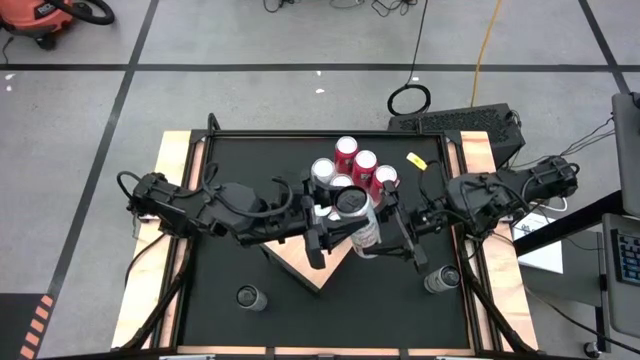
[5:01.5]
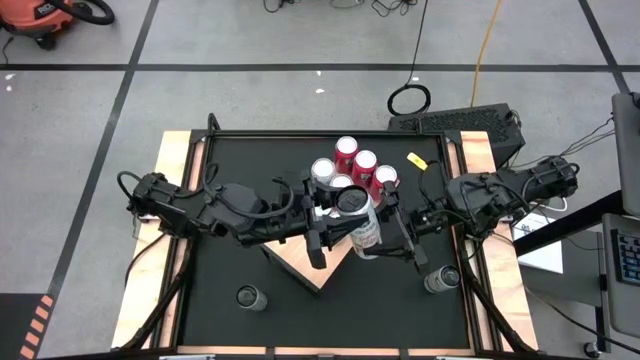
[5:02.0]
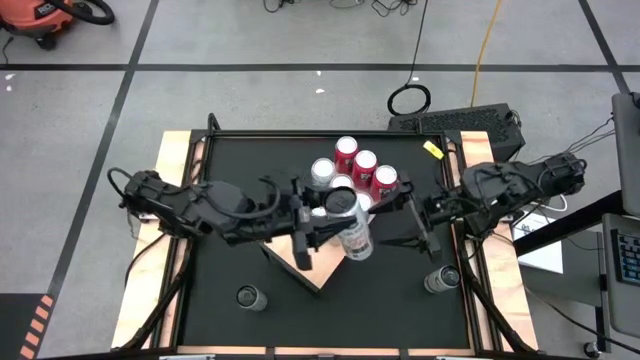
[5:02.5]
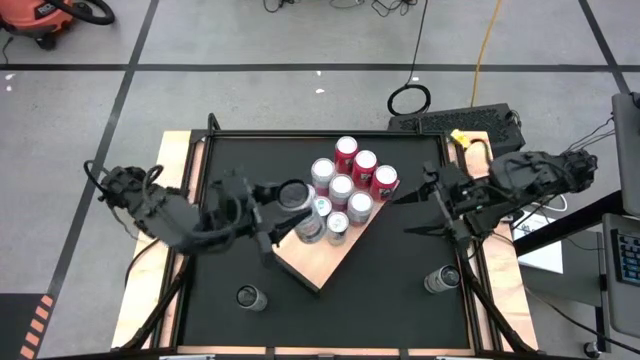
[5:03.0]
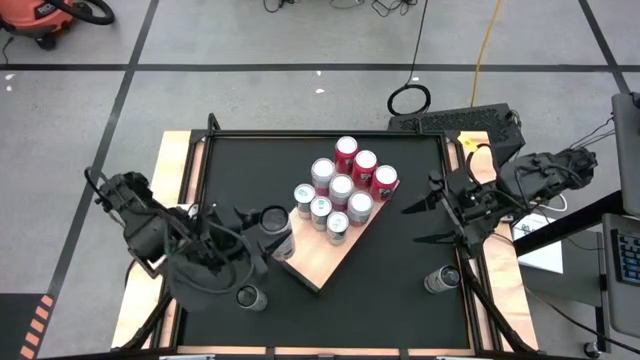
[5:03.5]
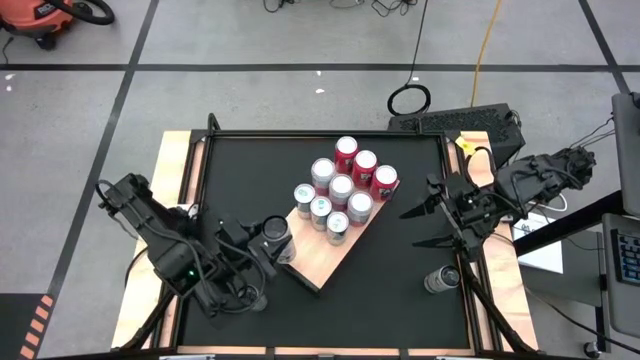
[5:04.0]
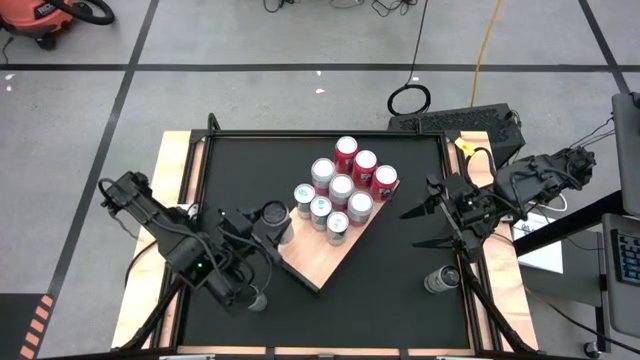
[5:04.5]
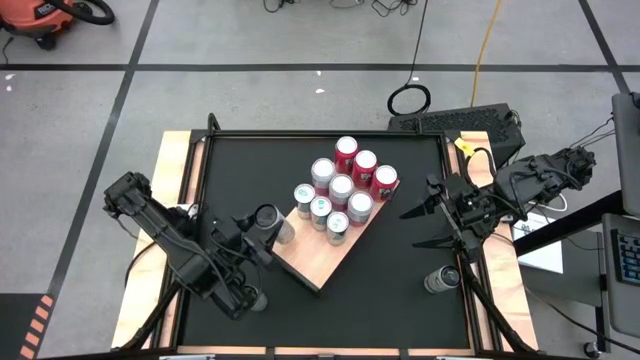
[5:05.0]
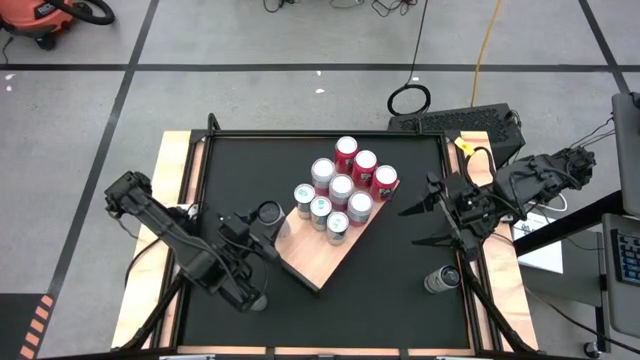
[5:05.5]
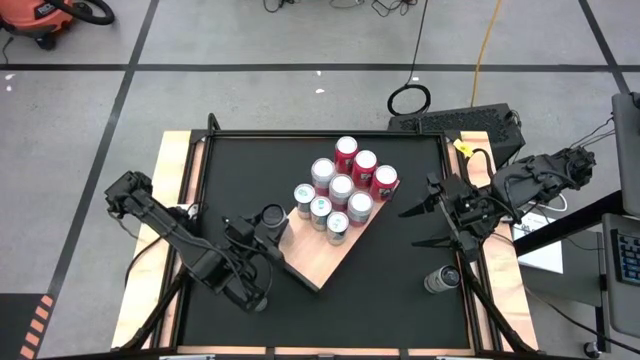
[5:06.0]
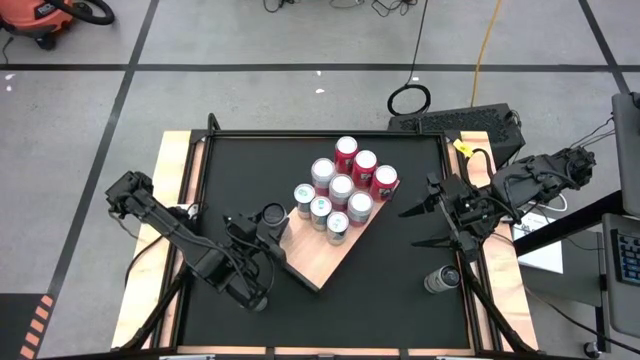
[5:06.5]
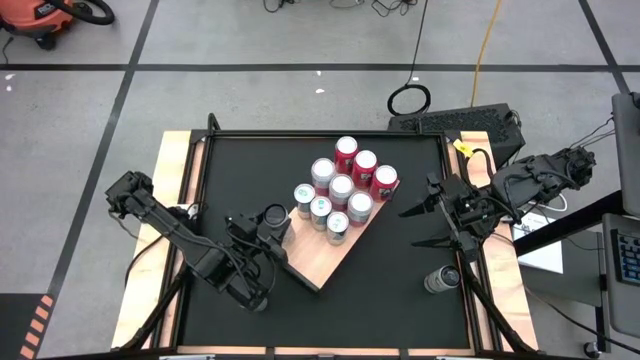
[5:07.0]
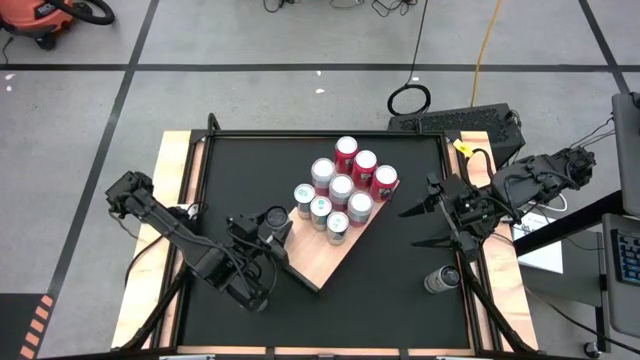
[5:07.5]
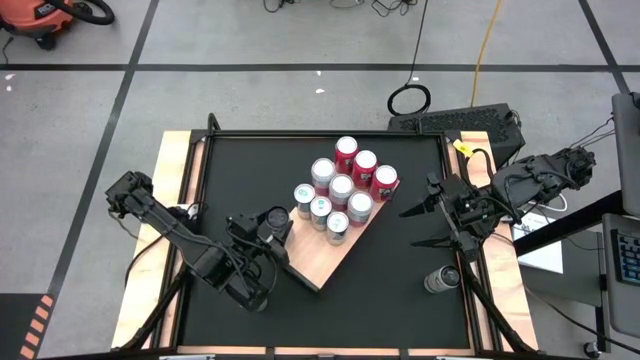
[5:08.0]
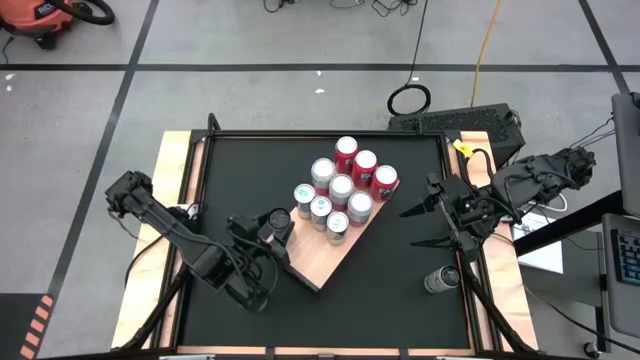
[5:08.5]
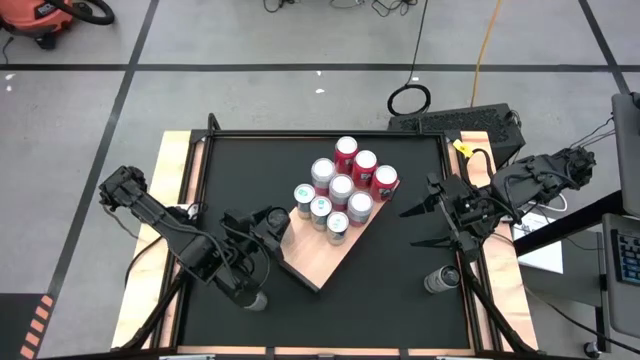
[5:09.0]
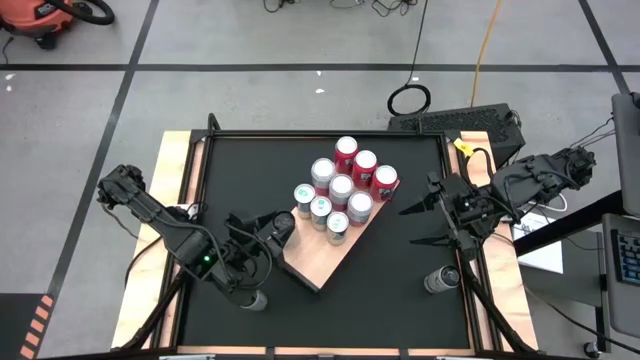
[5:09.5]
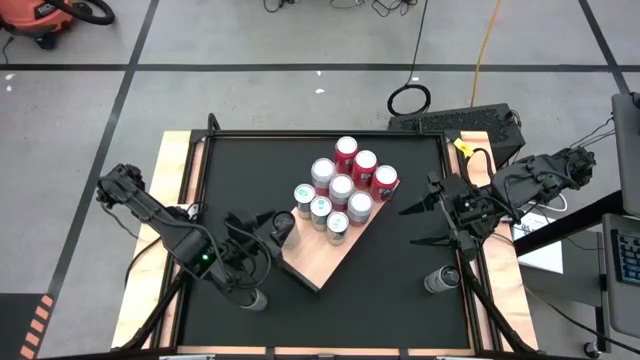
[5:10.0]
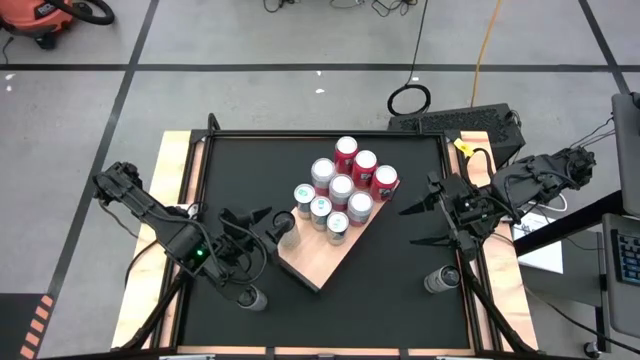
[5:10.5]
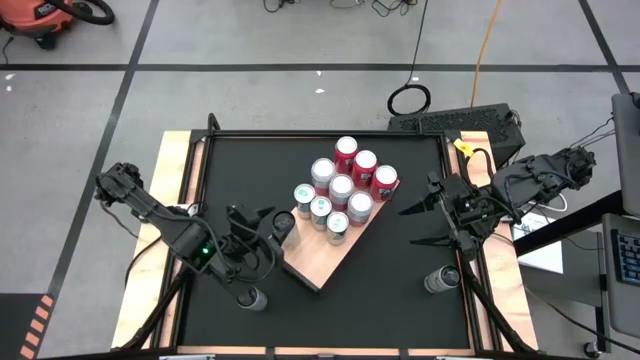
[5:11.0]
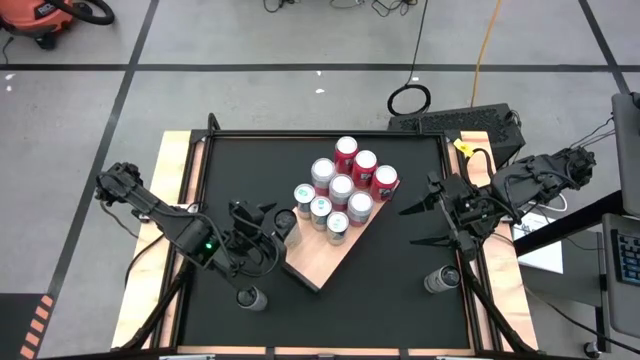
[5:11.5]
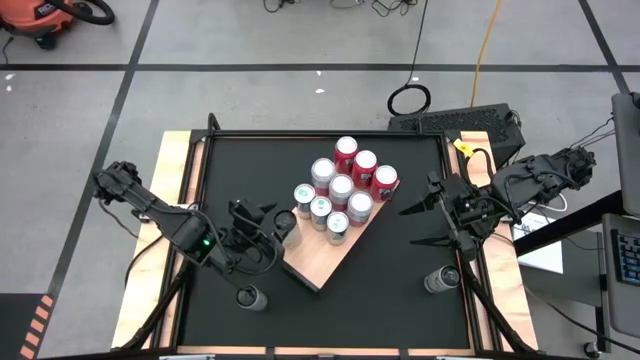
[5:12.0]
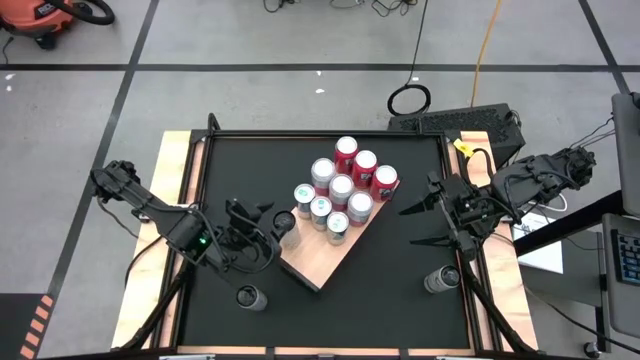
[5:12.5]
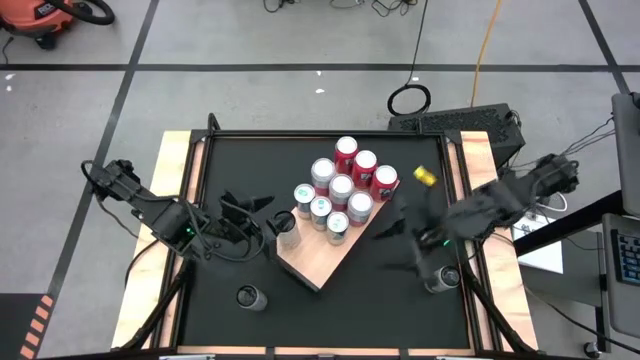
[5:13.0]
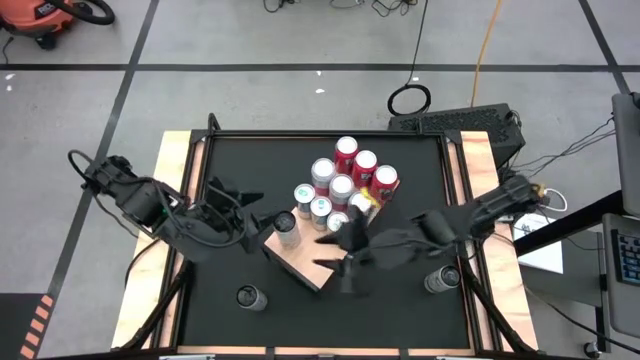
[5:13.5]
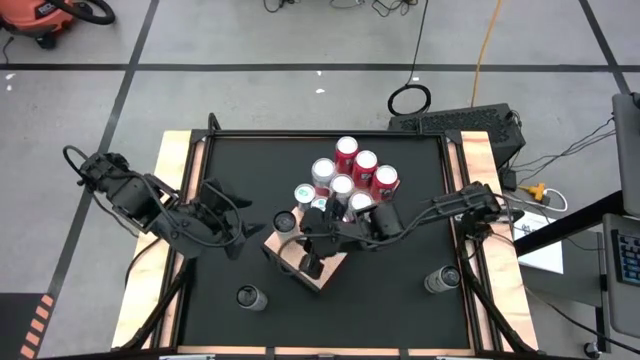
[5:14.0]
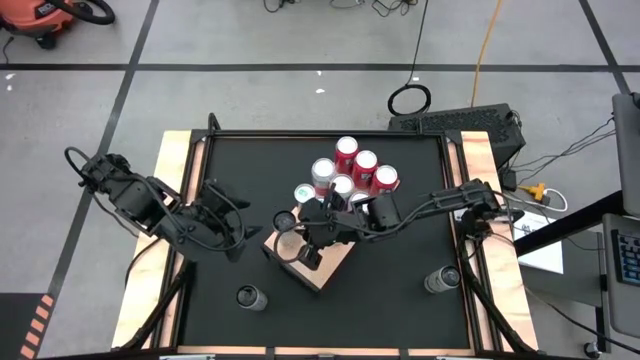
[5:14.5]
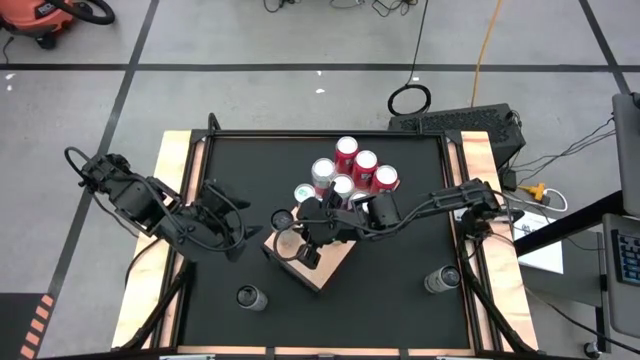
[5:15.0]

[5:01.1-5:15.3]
Task: Place canned beverage on shelf
Put the top left white-yellow soda can on the shelf

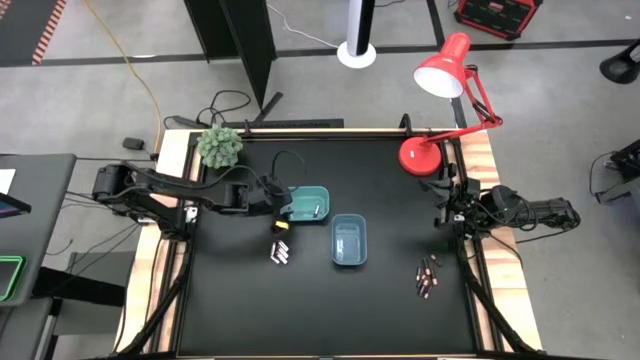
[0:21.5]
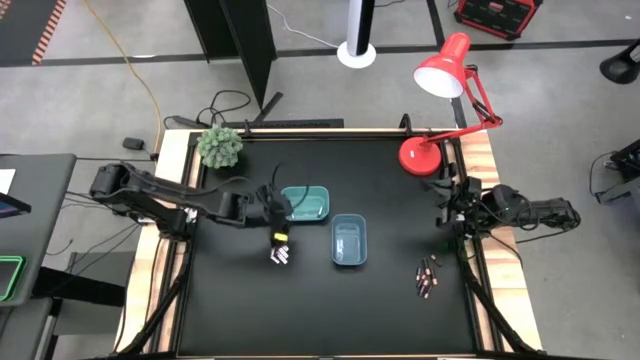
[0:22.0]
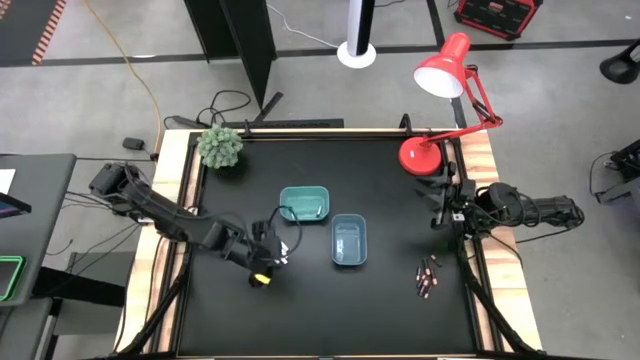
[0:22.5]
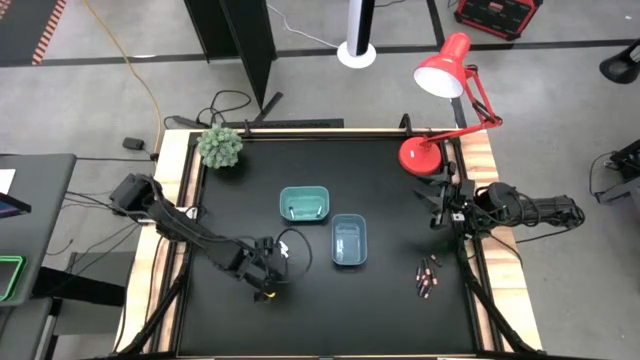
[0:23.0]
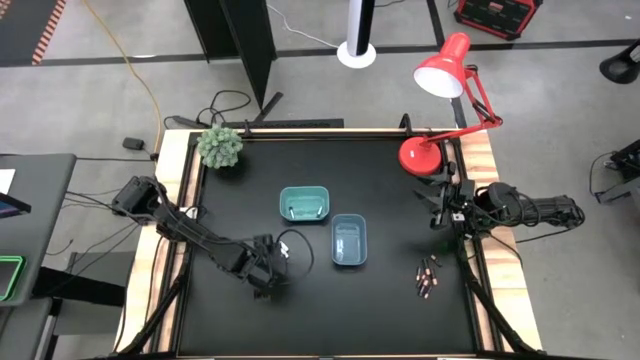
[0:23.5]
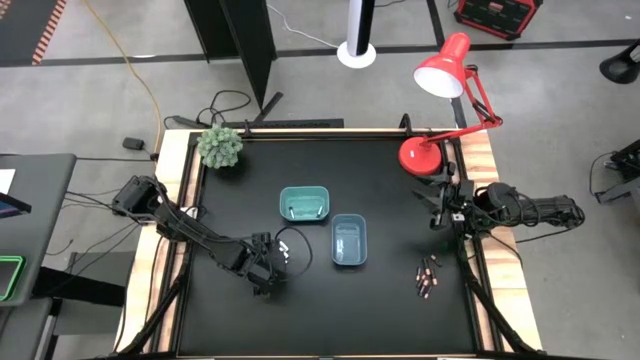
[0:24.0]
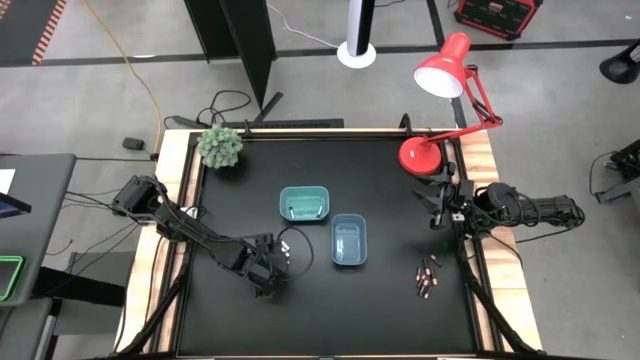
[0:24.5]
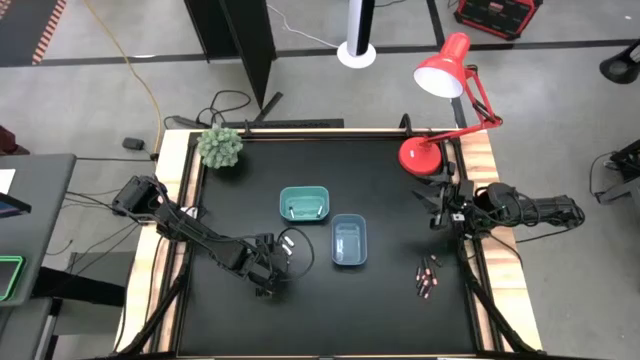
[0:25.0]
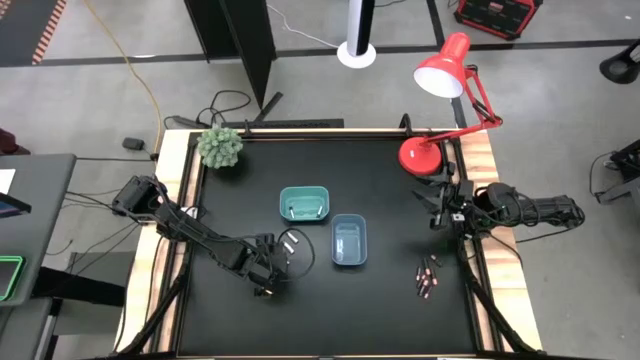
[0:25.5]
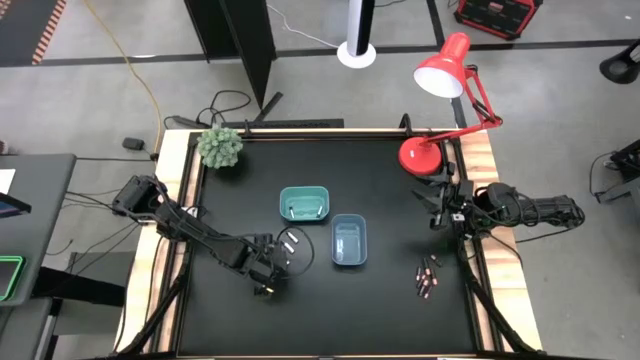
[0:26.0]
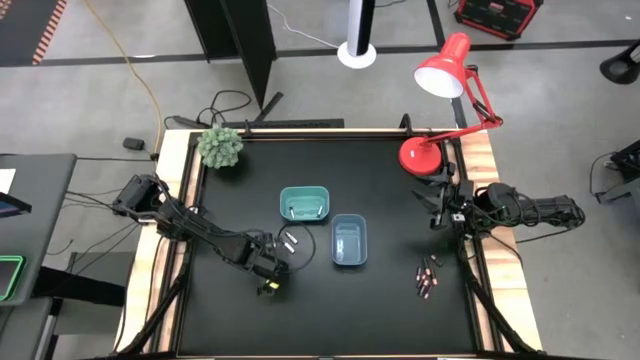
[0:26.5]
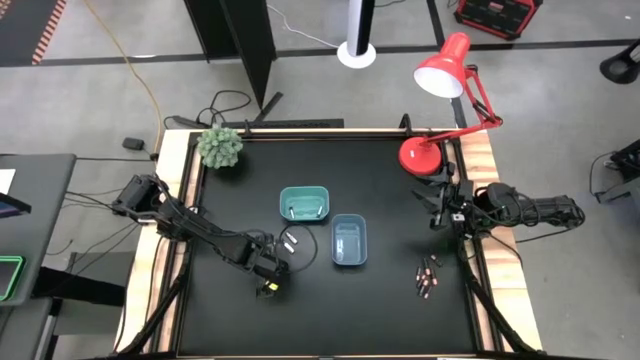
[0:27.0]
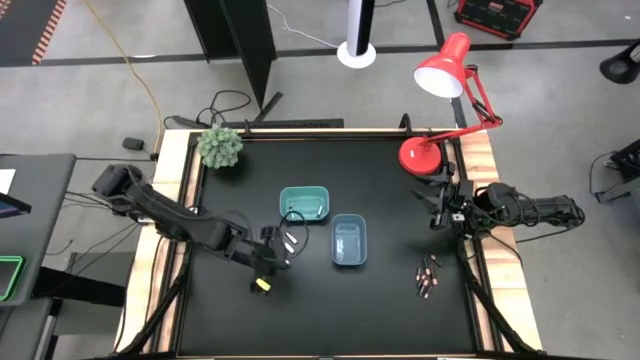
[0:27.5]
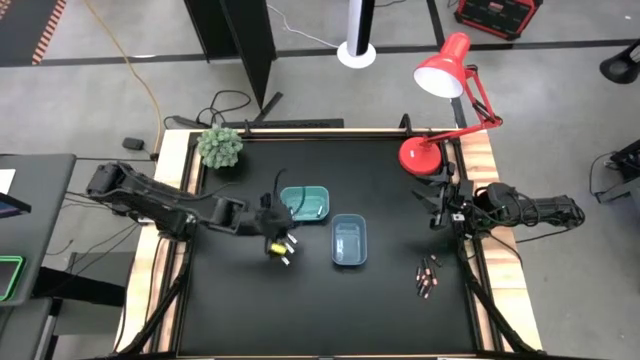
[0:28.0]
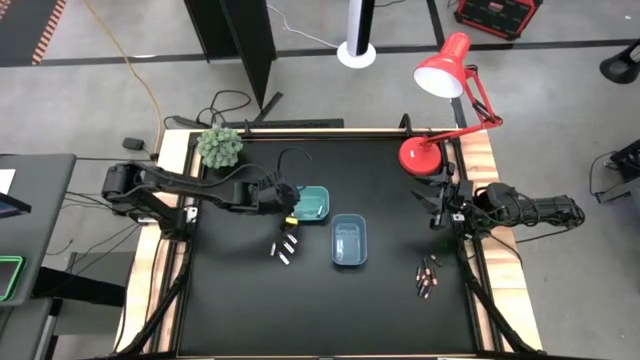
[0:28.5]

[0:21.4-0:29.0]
Task: Sort batteries
Put the silver battery into the light blue bin
